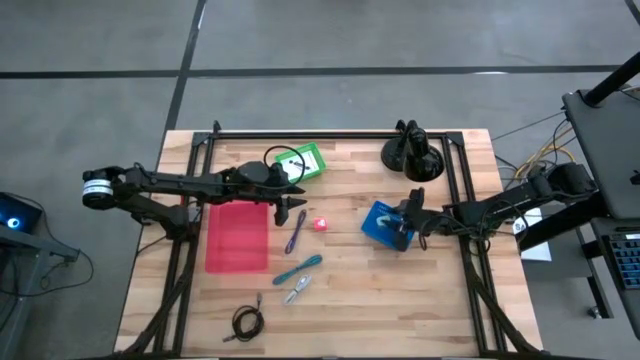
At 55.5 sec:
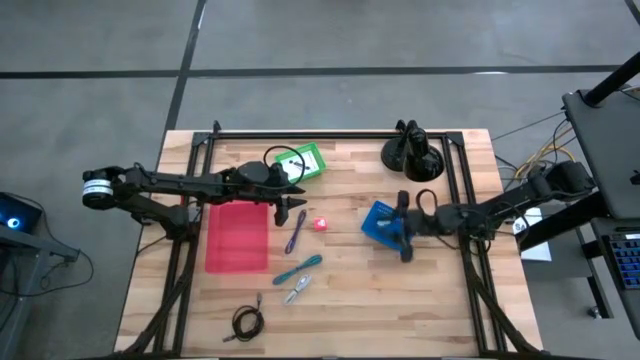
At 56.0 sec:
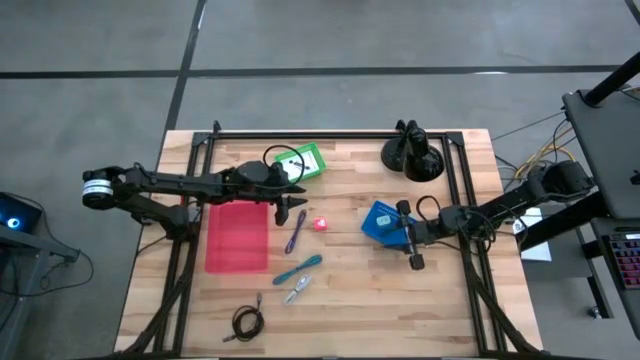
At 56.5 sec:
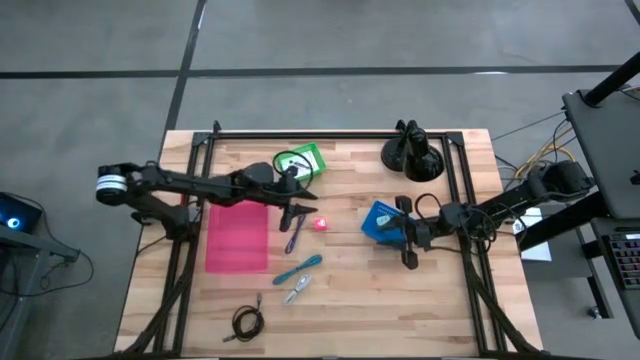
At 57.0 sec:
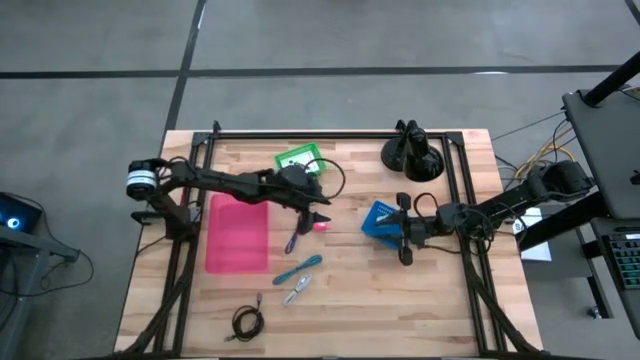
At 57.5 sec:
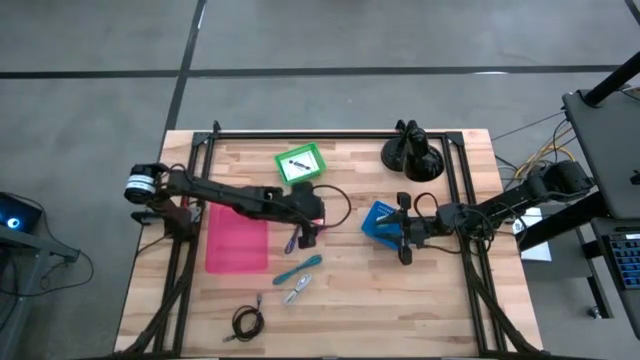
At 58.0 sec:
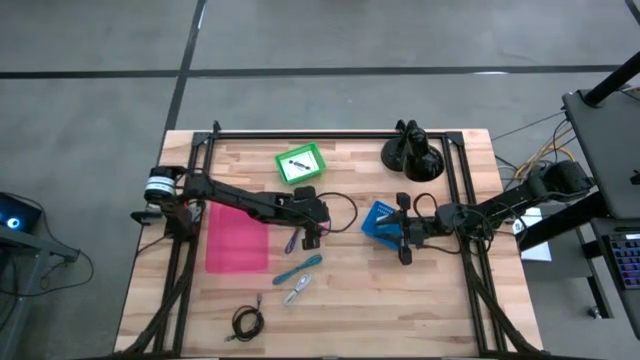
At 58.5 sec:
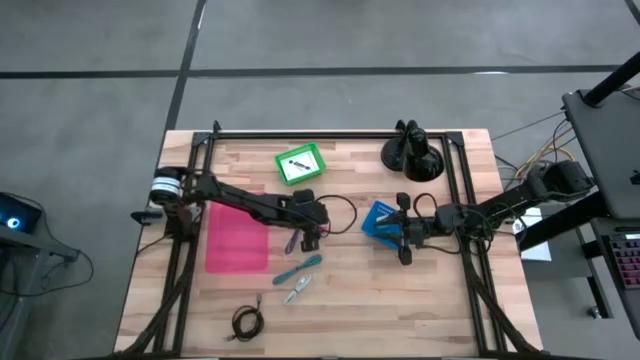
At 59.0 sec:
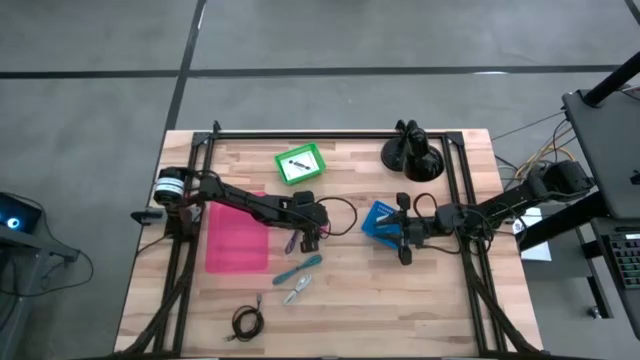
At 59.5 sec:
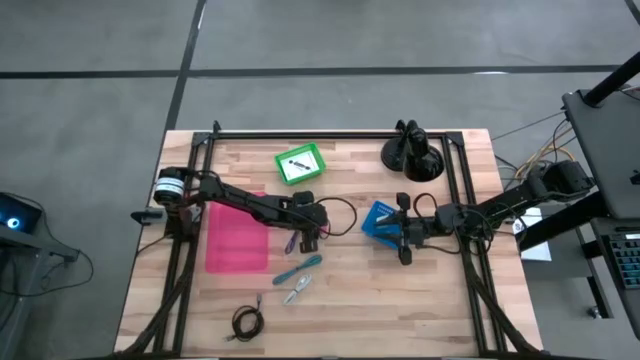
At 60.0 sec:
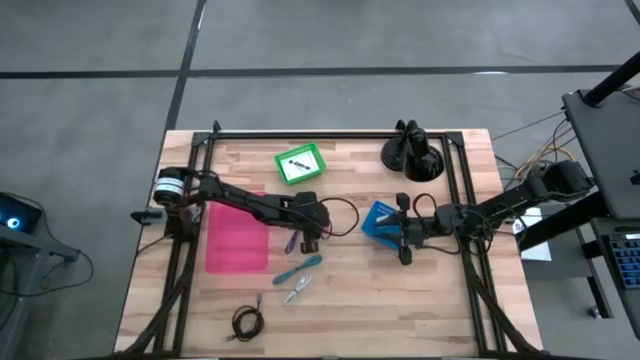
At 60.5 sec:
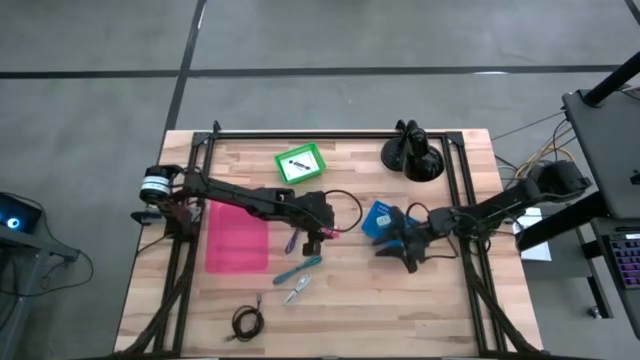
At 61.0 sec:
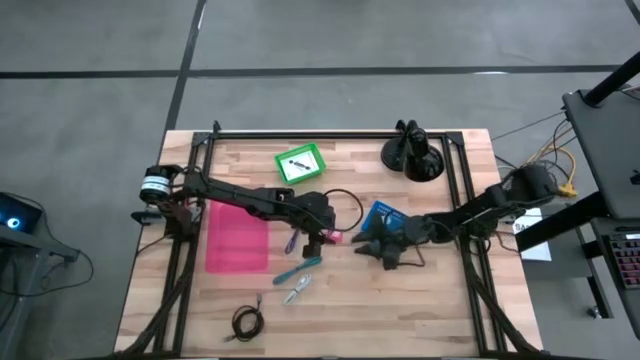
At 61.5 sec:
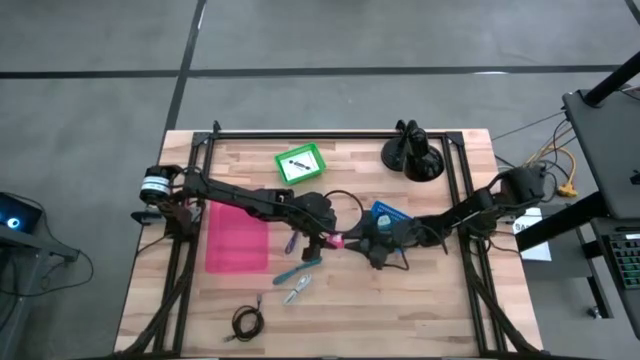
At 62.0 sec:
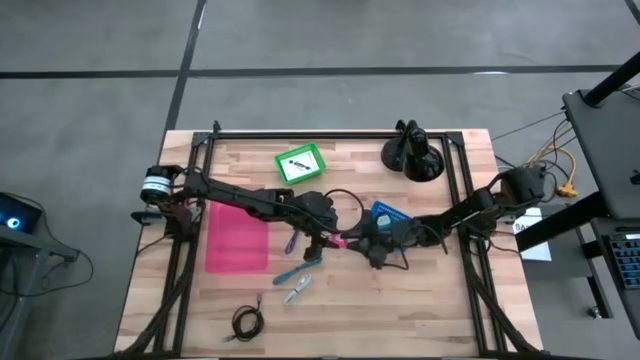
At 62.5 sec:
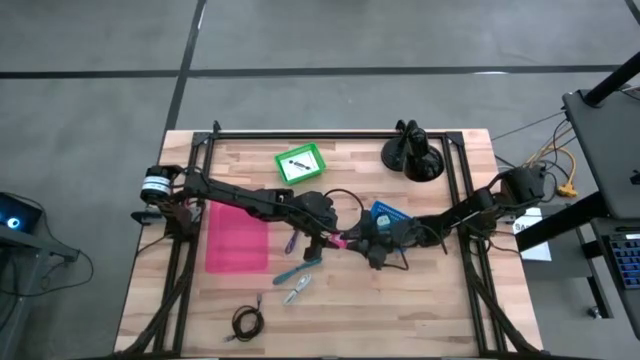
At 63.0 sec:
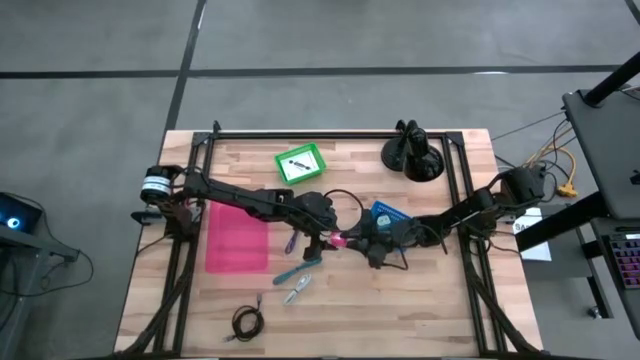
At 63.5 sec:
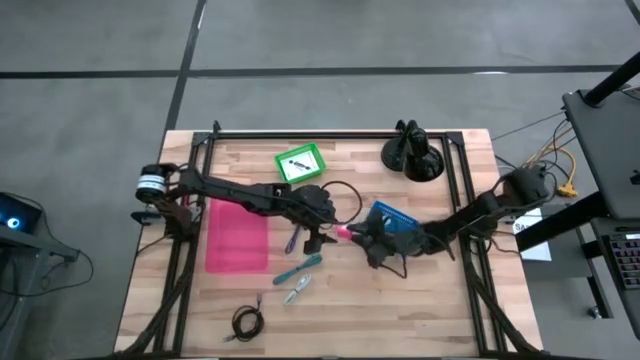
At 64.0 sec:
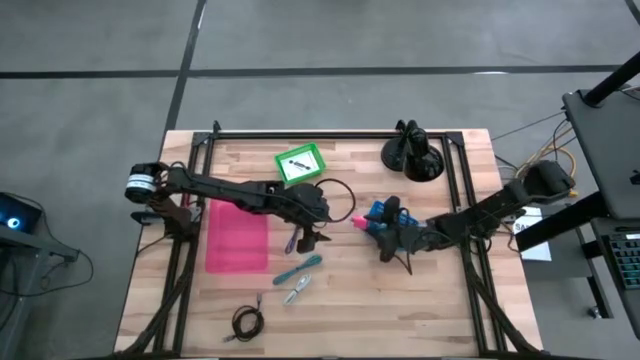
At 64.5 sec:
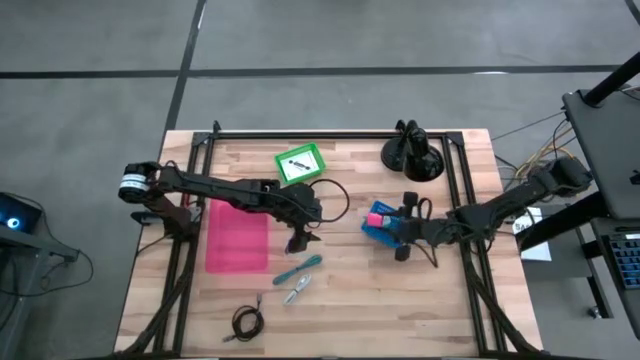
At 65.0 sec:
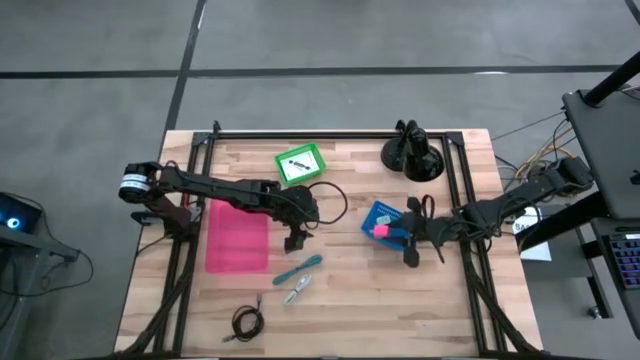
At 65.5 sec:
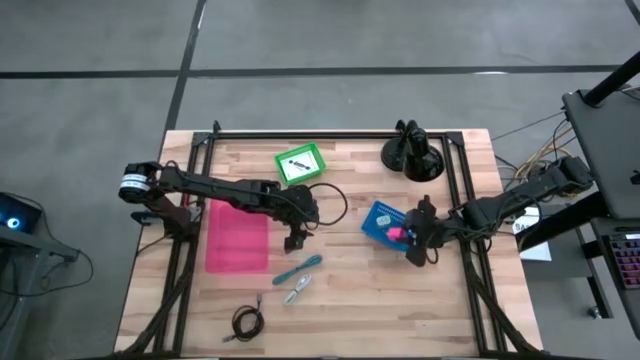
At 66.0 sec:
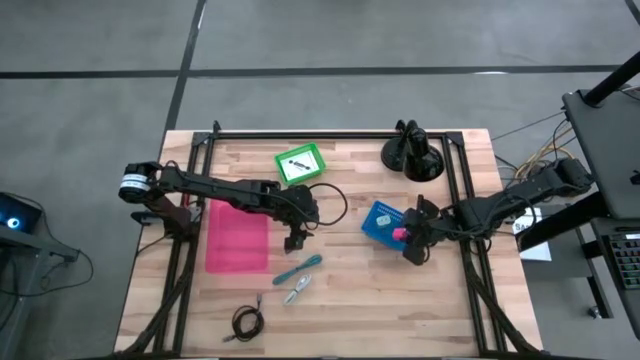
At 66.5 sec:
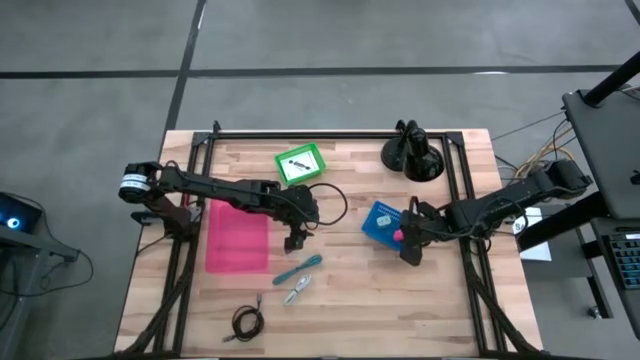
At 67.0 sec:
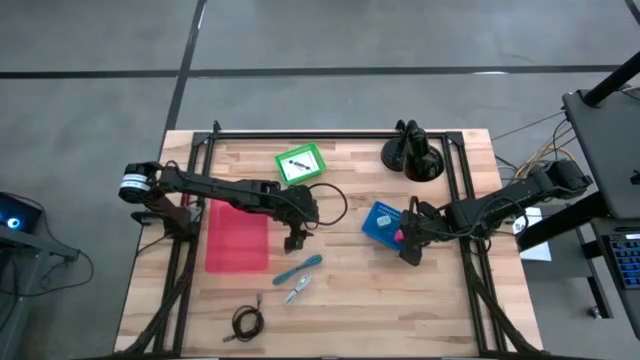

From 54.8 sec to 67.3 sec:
Task: Pick and place items into bin
Put the pink charger adapter into the blue bin

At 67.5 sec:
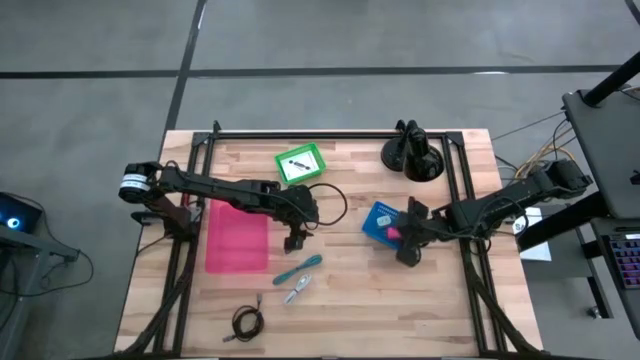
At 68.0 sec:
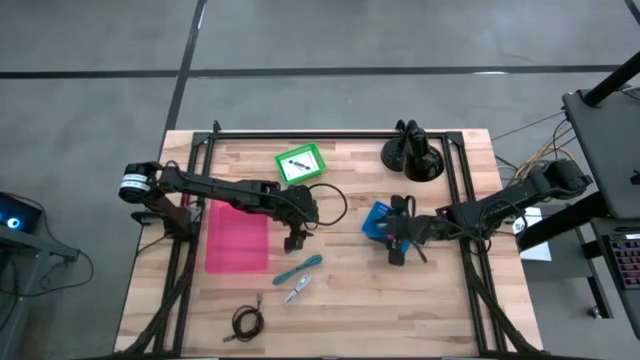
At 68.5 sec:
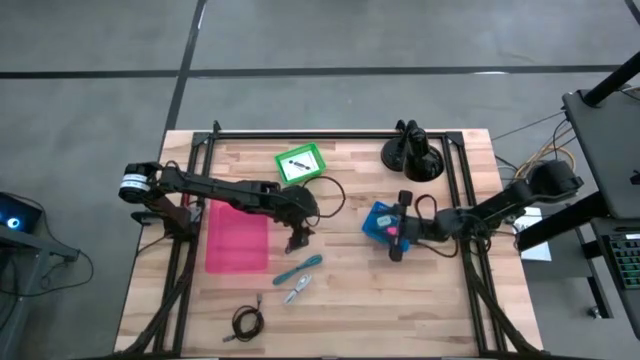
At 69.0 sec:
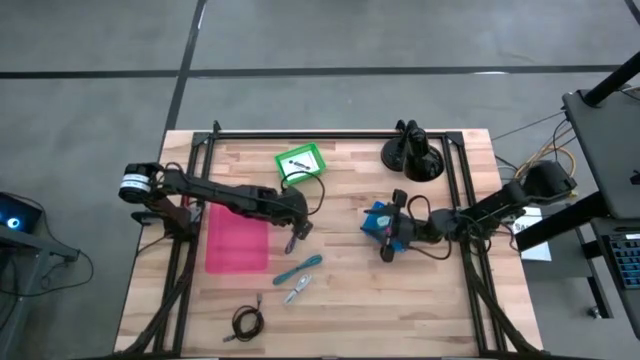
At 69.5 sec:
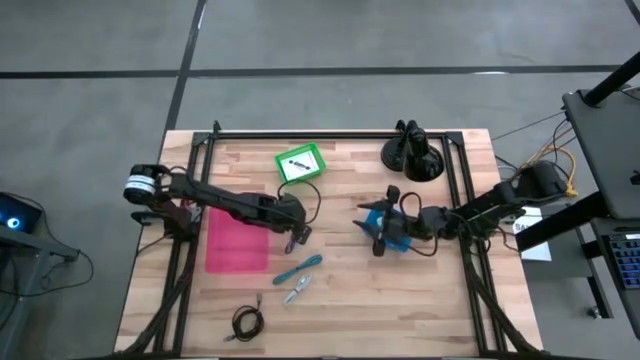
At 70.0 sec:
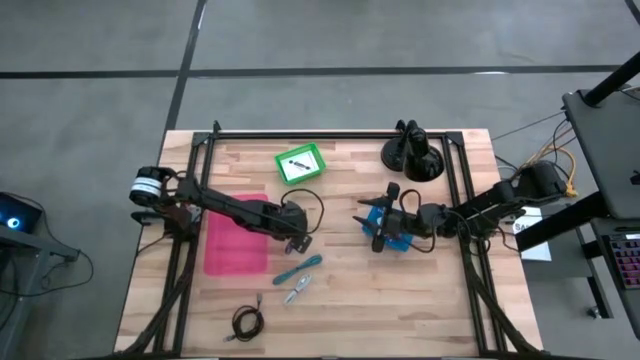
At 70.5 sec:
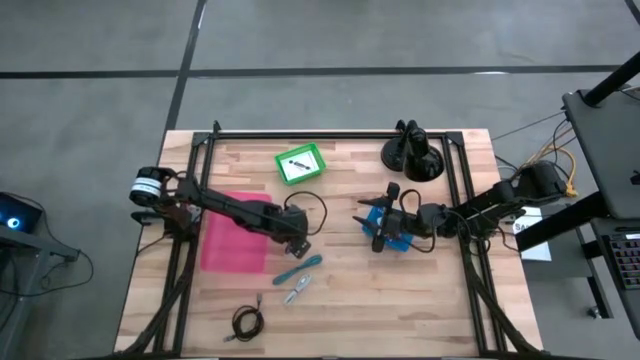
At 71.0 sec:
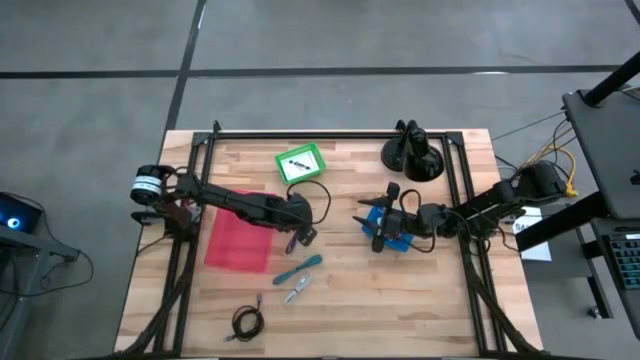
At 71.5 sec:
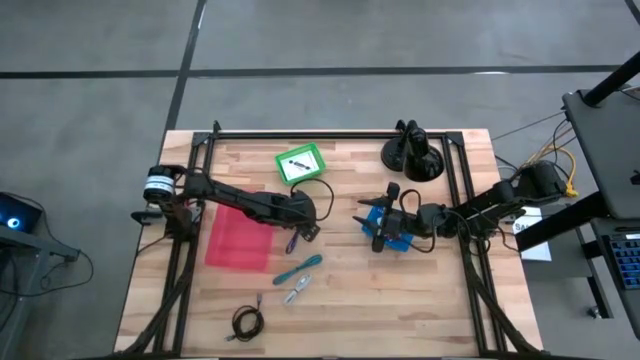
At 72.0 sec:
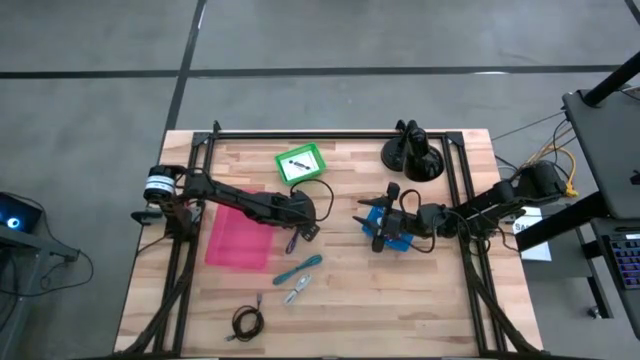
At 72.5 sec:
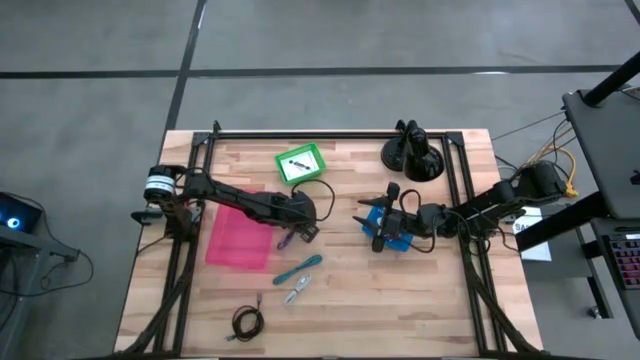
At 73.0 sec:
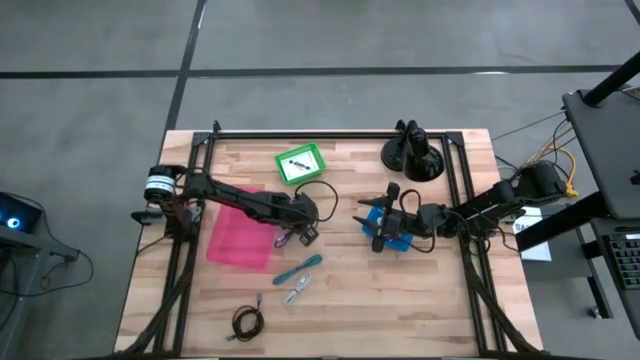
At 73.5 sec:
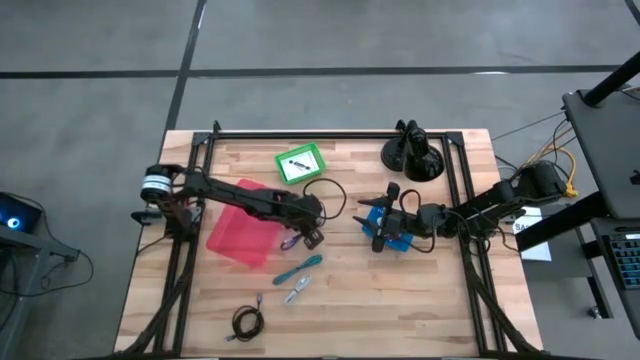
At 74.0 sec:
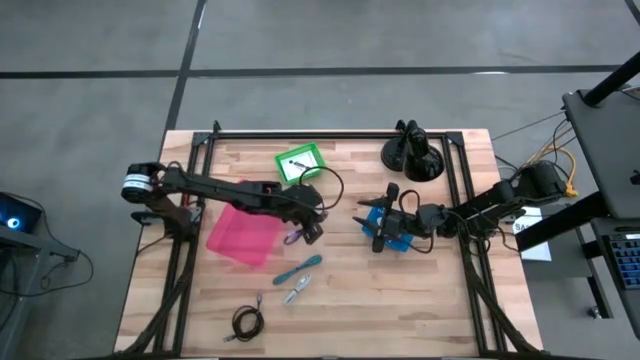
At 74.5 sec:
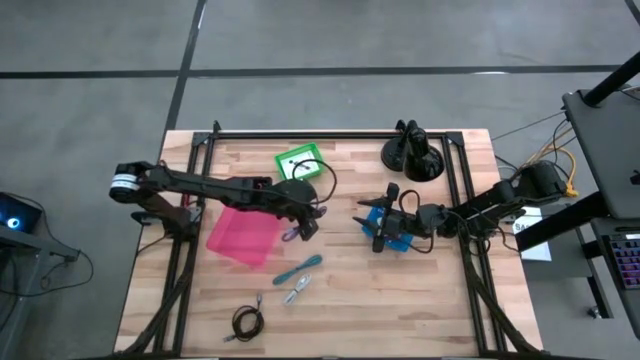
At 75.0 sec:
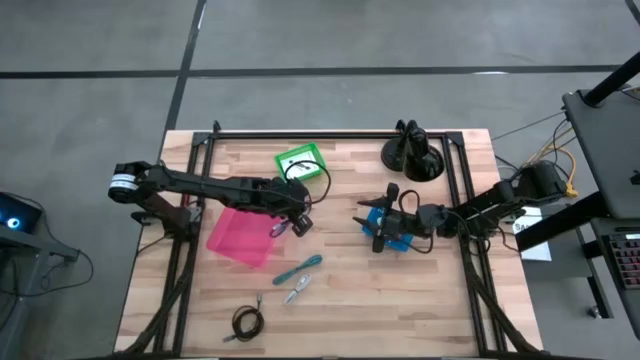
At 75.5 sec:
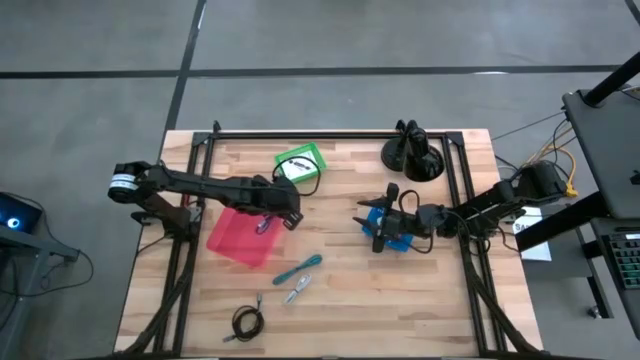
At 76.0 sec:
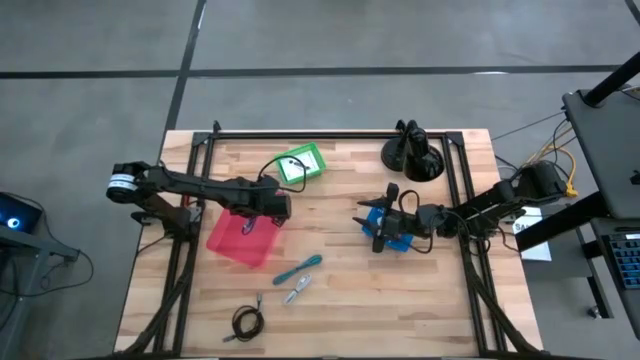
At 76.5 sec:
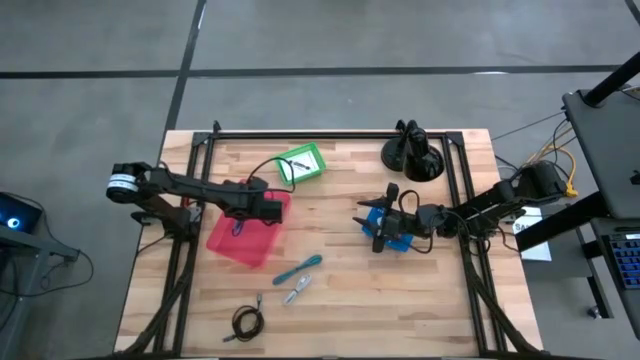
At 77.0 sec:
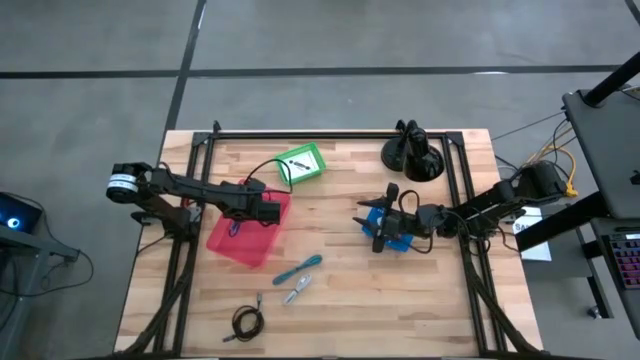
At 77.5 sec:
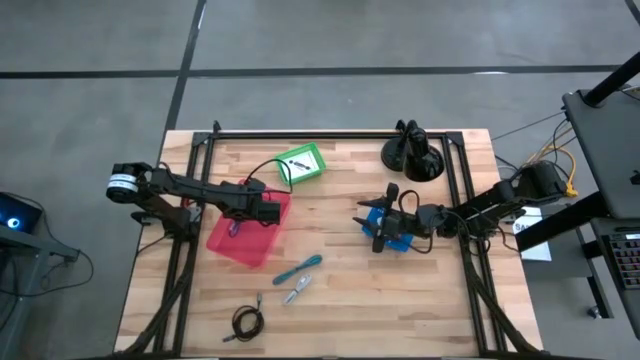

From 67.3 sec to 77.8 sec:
Put the dark blue charger cable into the pink bin
